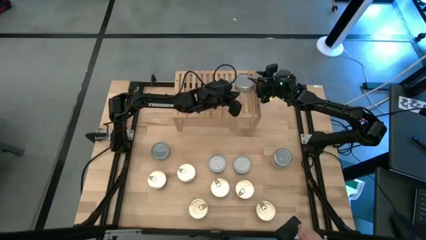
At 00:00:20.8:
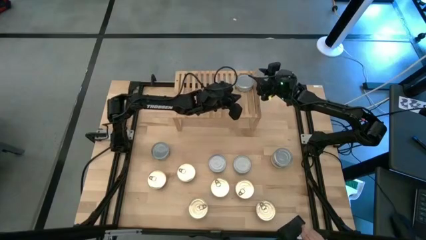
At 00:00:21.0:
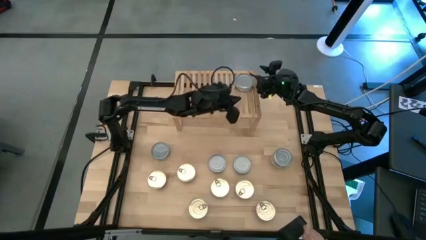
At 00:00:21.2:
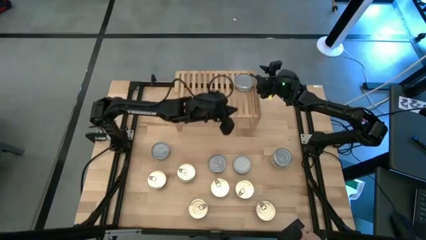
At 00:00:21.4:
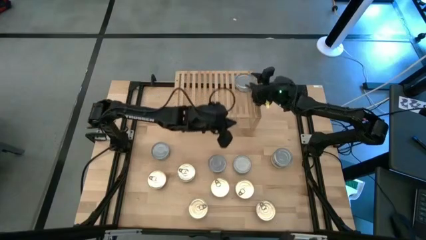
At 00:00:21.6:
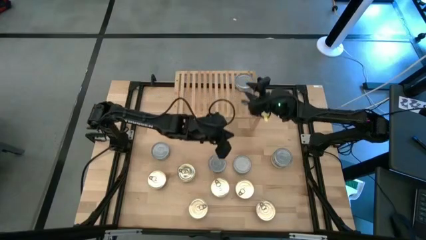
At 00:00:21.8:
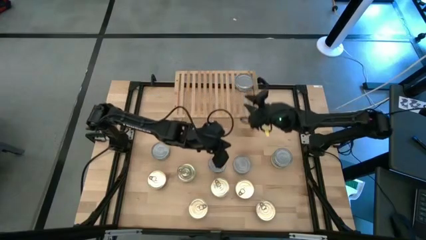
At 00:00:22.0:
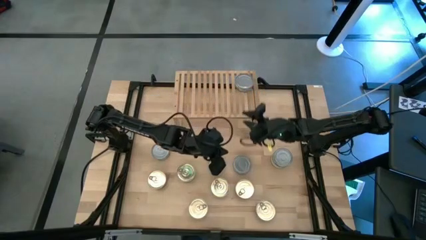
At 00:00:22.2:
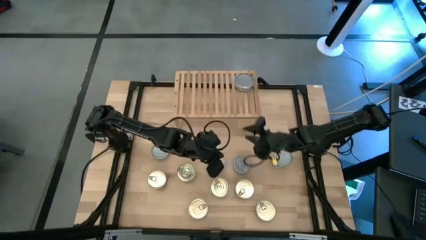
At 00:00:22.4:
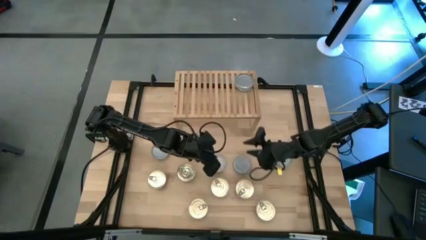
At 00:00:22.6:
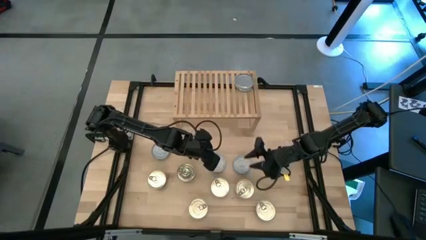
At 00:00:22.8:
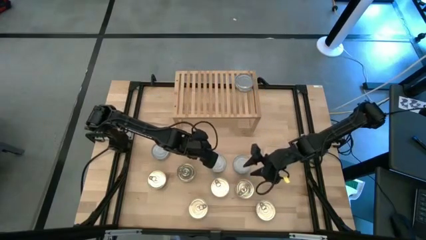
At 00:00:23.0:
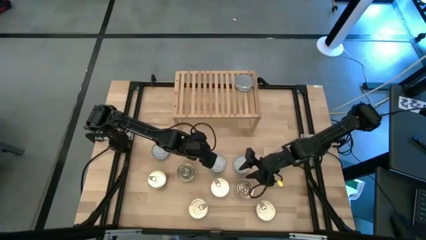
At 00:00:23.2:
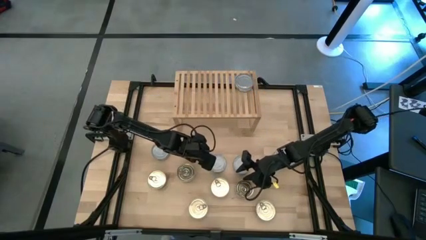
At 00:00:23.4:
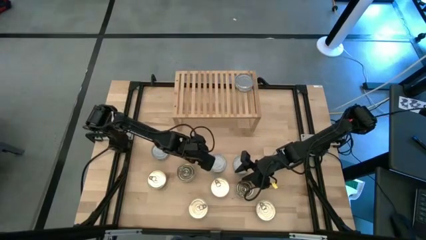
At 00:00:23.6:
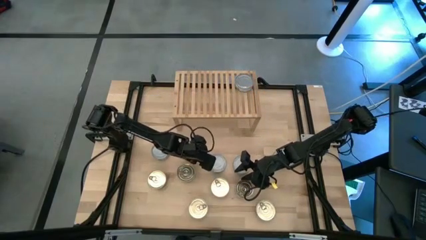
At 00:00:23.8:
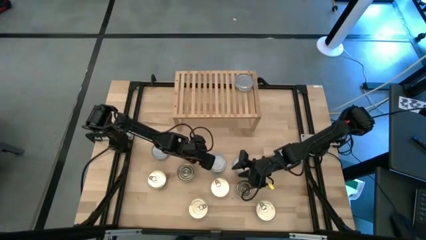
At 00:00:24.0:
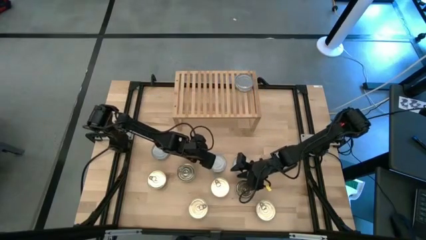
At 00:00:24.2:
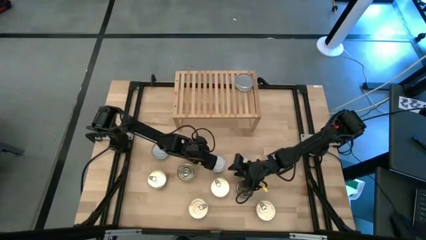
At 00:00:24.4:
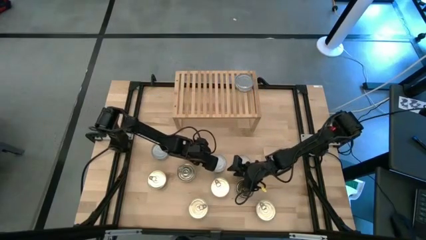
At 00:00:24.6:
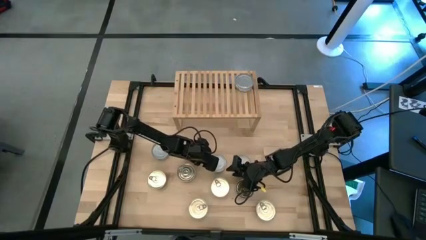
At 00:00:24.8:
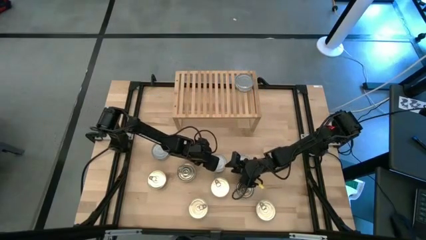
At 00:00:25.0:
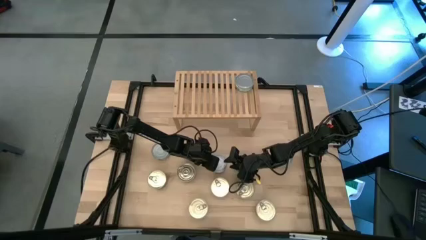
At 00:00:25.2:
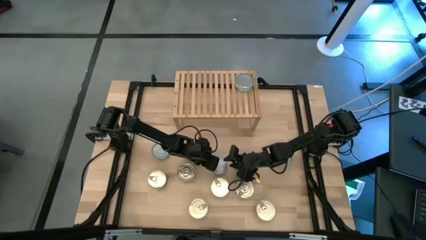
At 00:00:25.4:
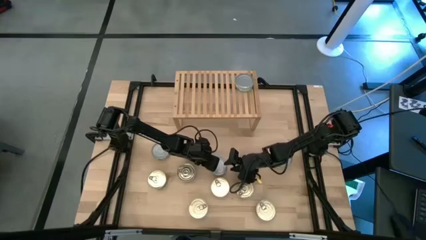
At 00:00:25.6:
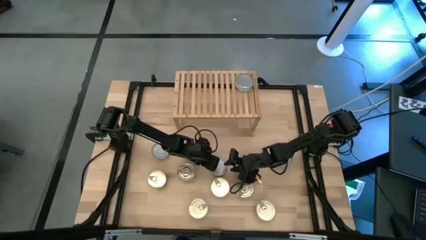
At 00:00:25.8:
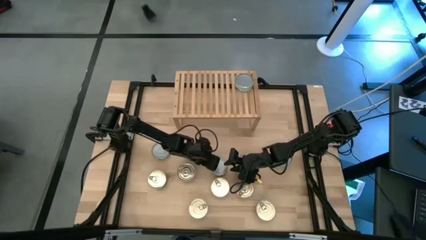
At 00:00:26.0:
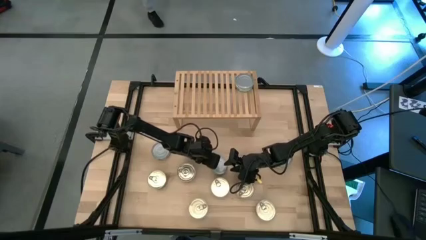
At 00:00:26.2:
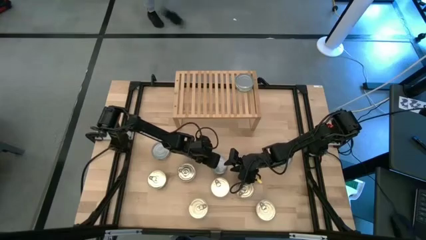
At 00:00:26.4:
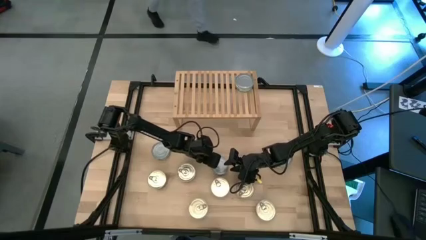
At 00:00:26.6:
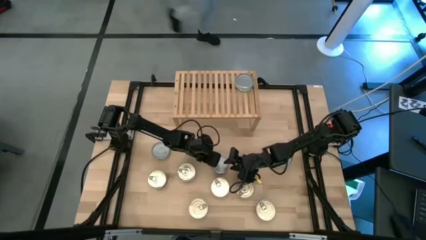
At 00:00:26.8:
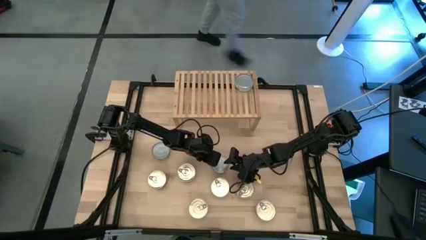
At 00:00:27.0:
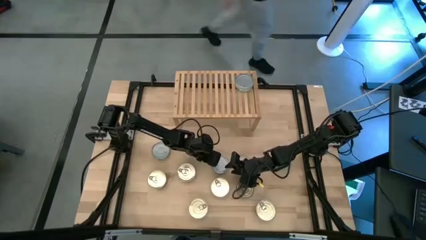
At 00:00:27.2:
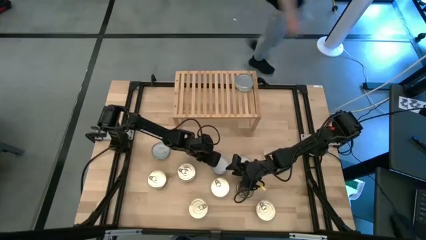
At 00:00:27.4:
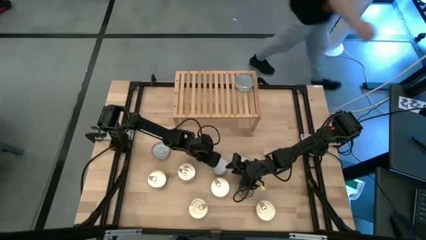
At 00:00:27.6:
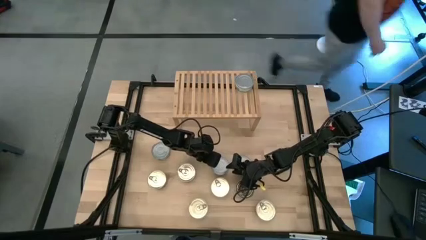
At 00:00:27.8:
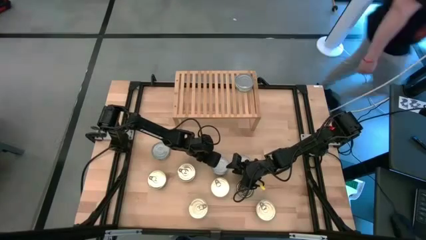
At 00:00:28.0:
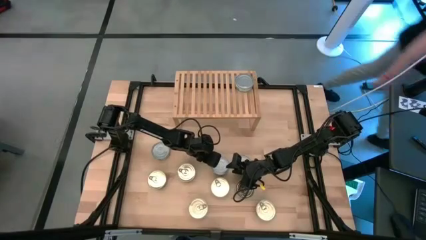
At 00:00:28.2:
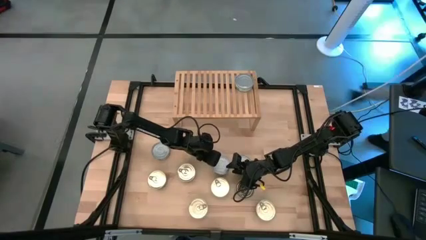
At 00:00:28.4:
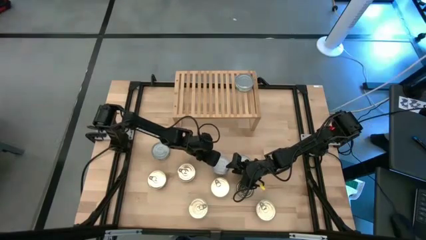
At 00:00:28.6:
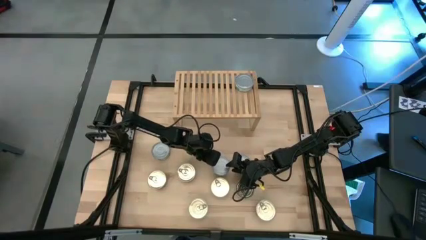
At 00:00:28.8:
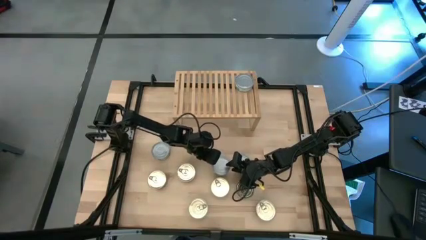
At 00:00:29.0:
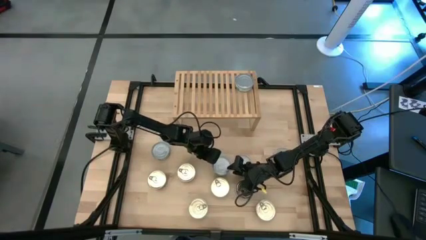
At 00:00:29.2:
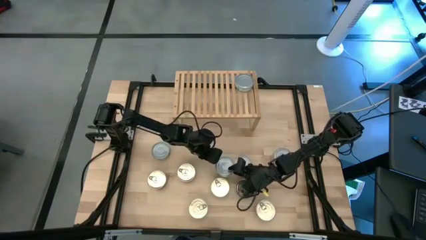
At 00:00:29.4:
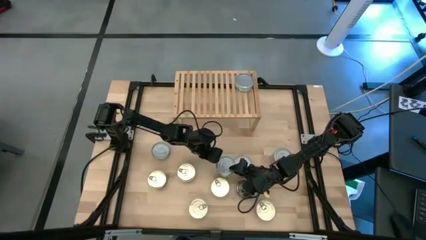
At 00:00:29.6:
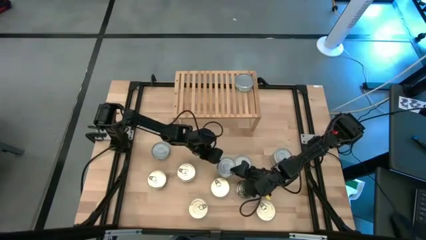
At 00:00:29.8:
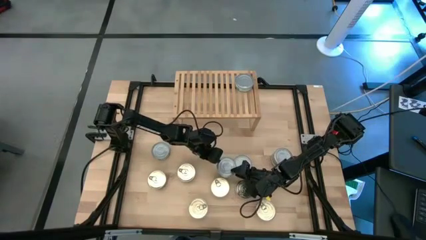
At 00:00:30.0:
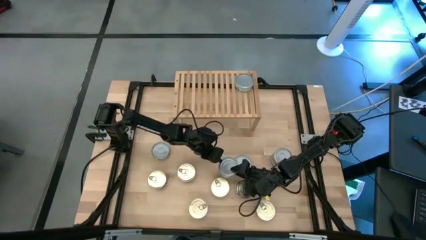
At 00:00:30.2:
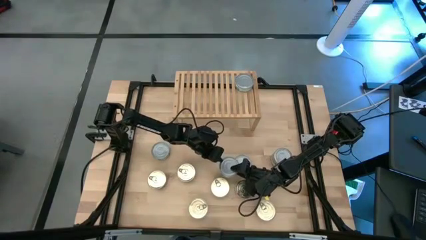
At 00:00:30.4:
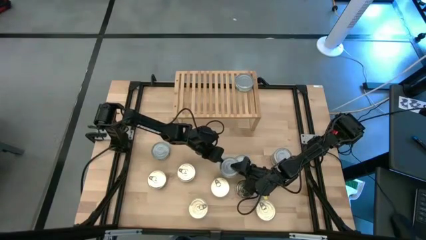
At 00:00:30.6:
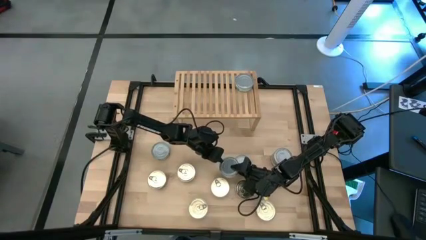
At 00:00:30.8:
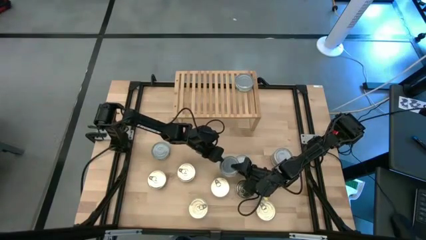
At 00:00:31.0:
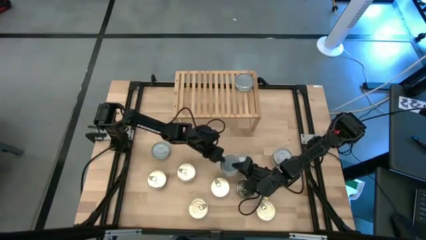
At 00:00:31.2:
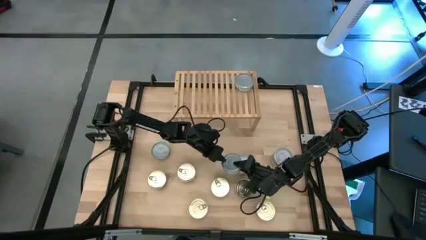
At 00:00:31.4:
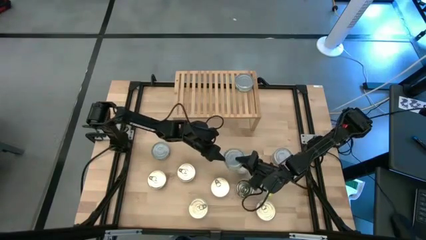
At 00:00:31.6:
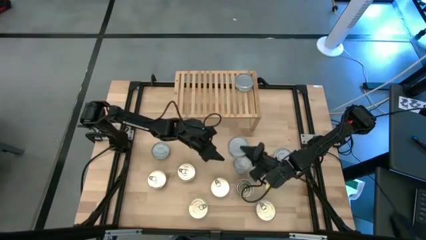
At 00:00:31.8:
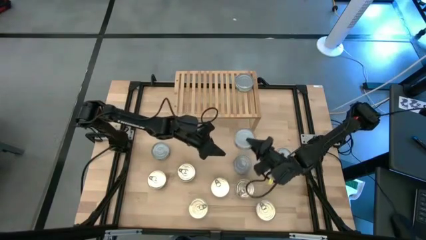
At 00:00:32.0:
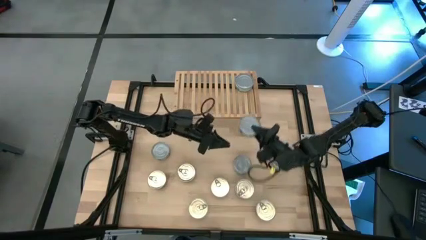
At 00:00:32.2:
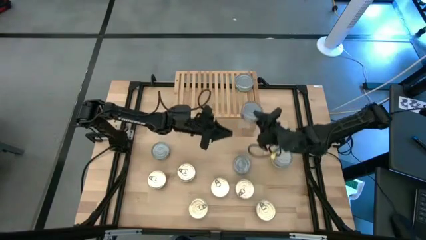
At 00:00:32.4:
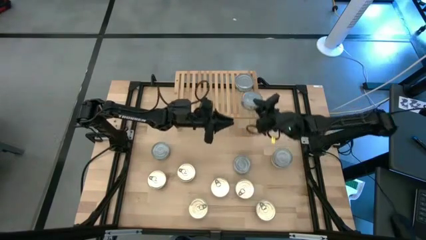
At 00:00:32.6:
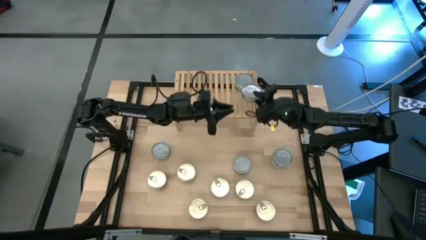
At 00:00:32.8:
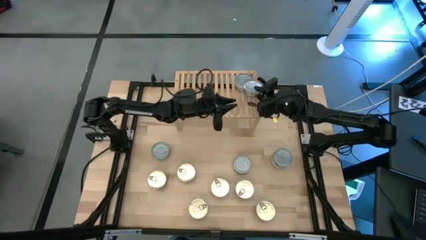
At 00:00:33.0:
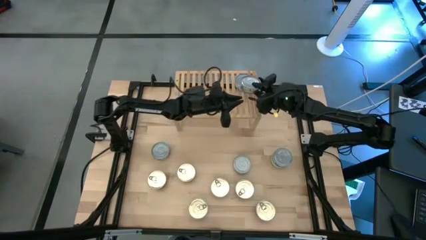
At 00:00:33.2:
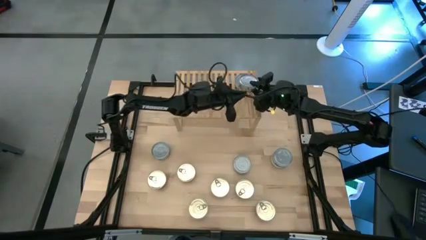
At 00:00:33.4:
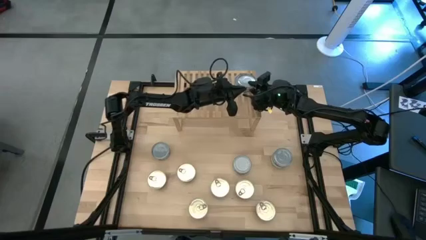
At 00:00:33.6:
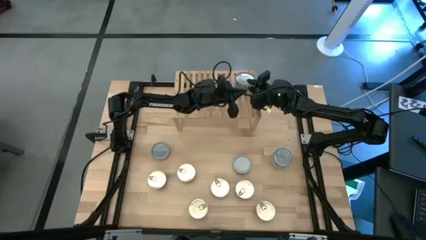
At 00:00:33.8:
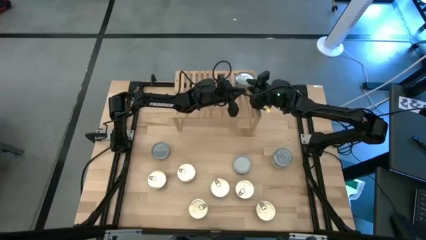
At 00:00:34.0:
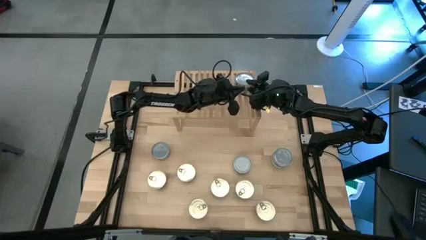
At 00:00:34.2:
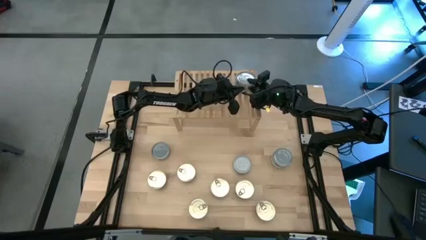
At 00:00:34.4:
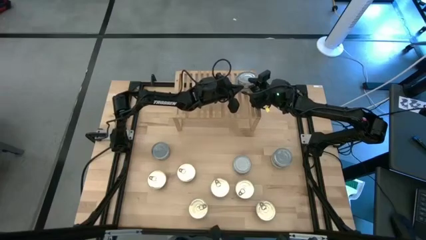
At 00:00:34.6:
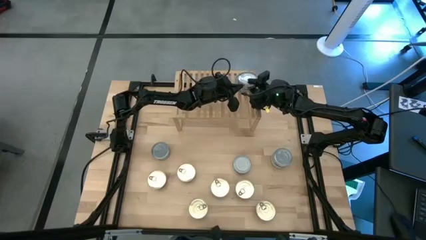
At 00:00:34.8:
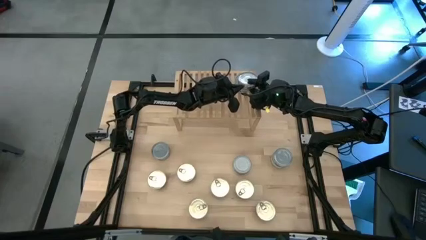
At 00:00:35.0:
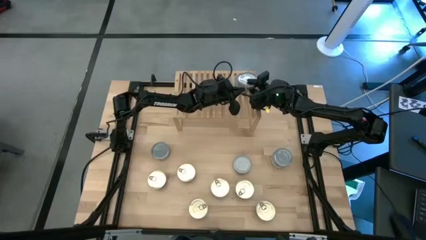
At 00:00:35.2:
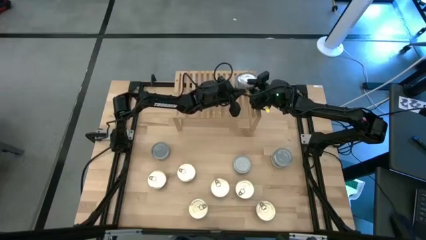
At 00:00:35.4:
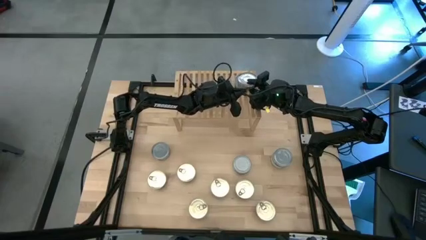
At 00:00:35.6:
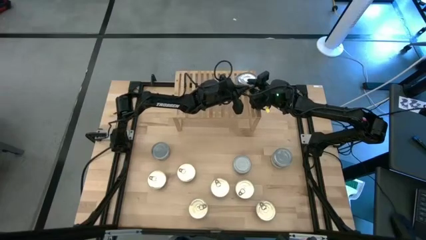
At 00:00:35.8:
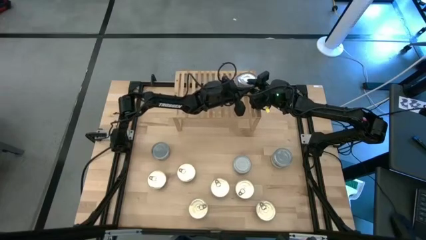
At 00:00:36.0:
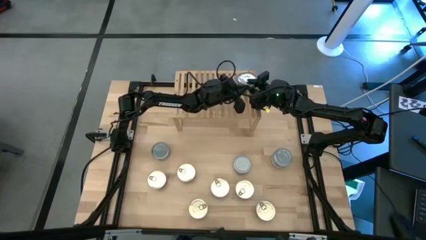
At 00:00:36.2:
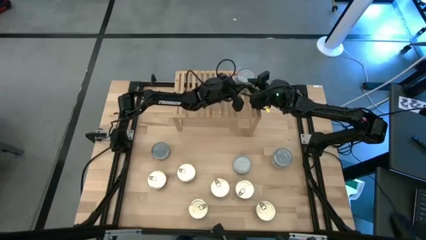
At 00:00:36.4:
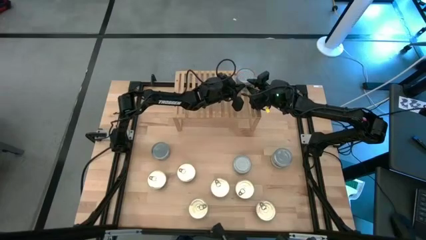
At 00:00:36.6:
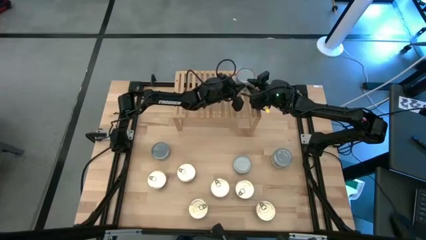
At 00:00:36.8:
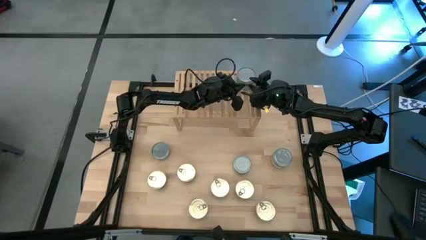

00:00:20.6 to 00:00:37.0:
Task: Stack canned seafood by type on shelf
Stack the green tuna can on top of the green tuna can on the shelf
